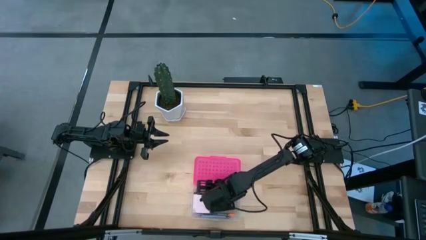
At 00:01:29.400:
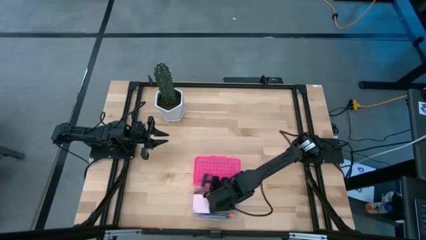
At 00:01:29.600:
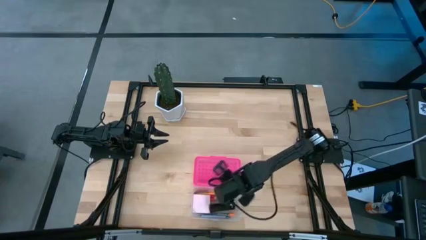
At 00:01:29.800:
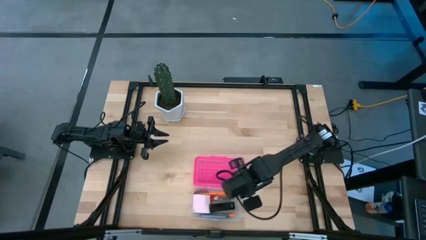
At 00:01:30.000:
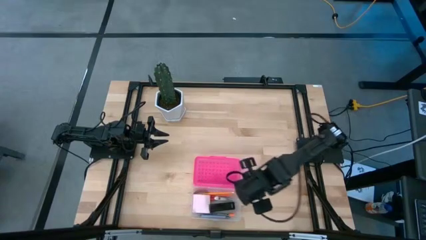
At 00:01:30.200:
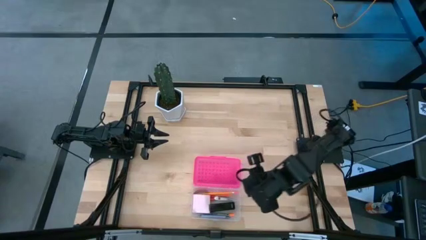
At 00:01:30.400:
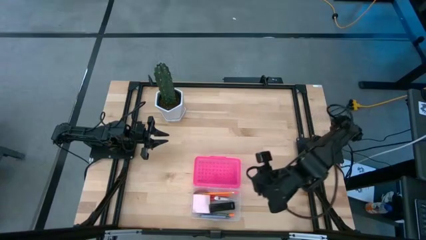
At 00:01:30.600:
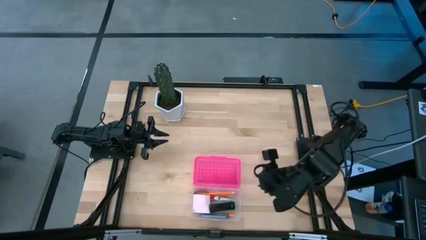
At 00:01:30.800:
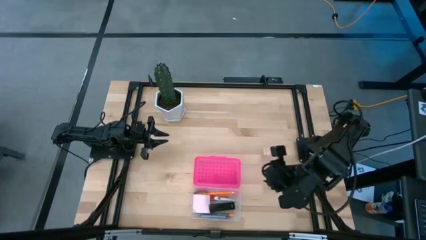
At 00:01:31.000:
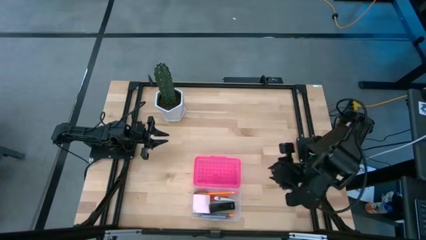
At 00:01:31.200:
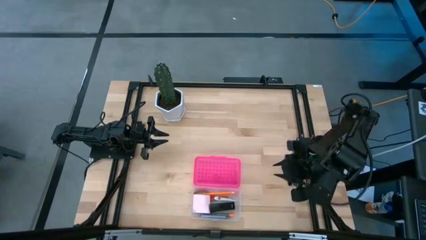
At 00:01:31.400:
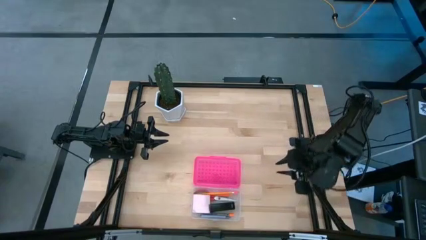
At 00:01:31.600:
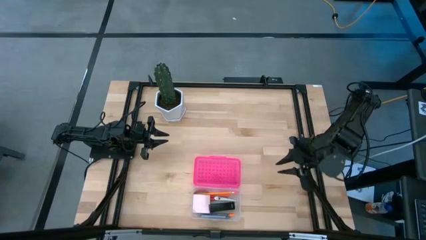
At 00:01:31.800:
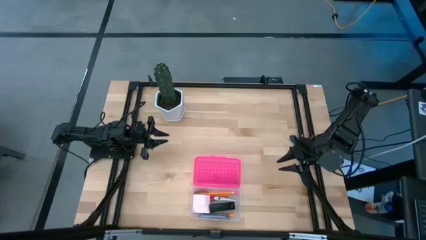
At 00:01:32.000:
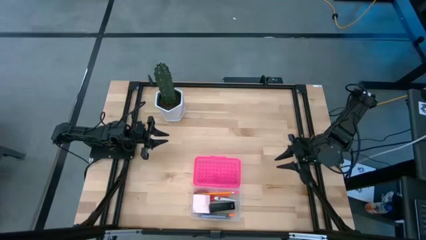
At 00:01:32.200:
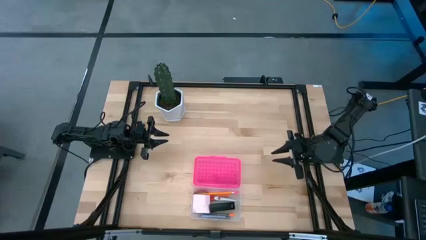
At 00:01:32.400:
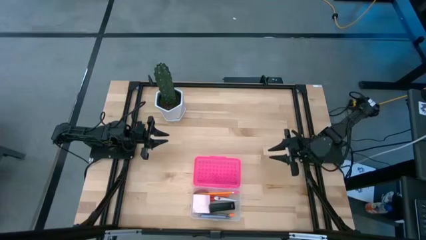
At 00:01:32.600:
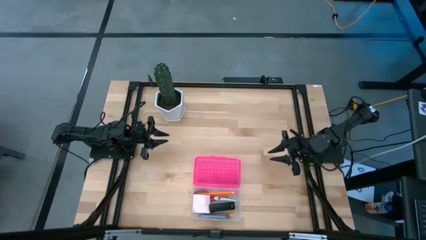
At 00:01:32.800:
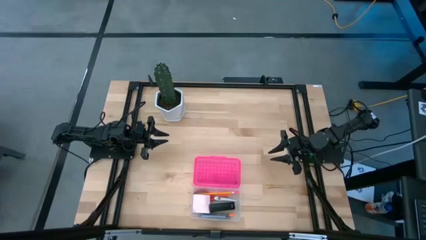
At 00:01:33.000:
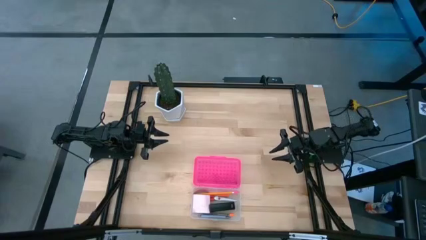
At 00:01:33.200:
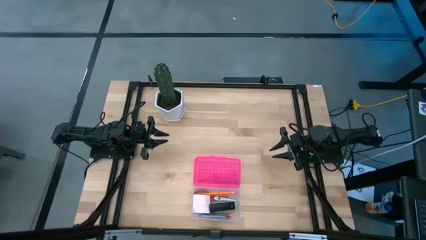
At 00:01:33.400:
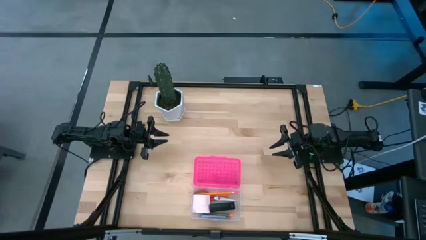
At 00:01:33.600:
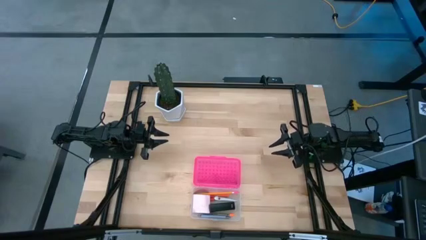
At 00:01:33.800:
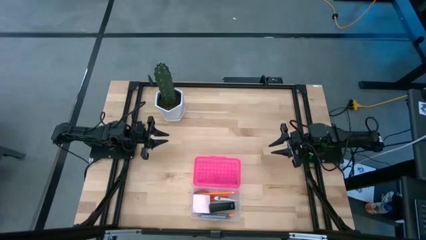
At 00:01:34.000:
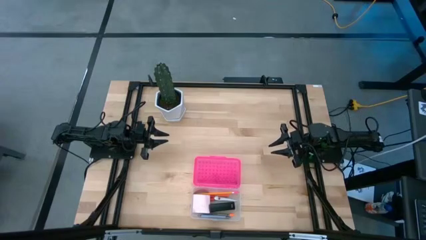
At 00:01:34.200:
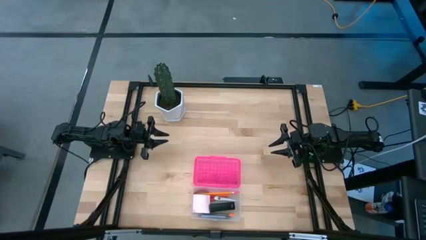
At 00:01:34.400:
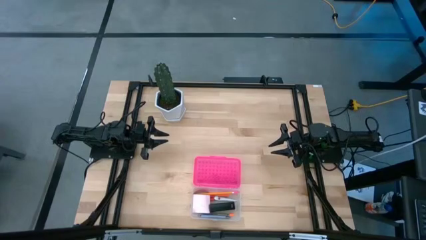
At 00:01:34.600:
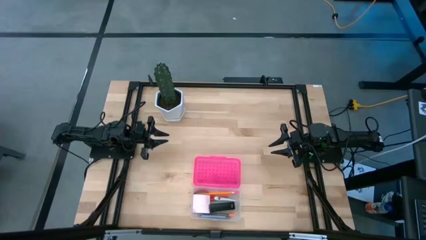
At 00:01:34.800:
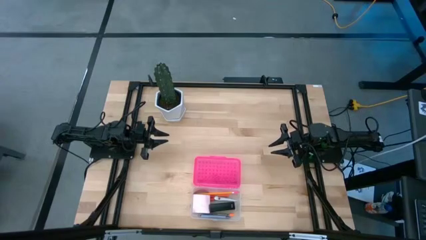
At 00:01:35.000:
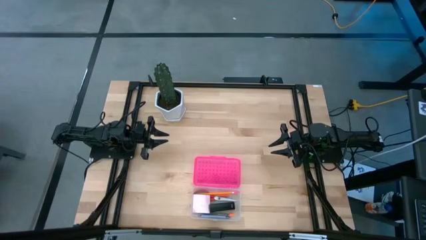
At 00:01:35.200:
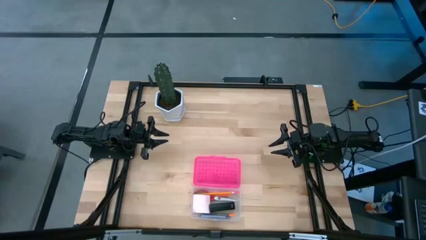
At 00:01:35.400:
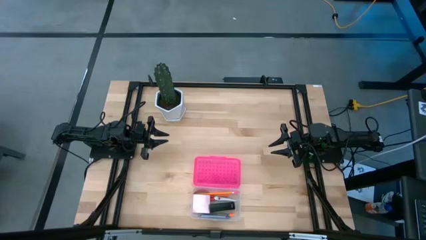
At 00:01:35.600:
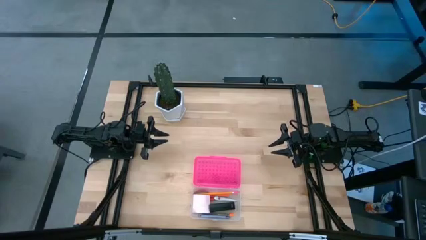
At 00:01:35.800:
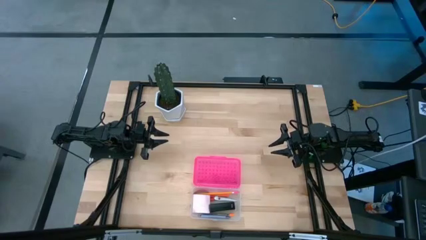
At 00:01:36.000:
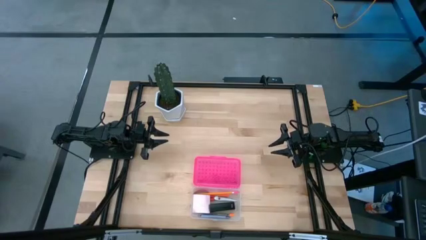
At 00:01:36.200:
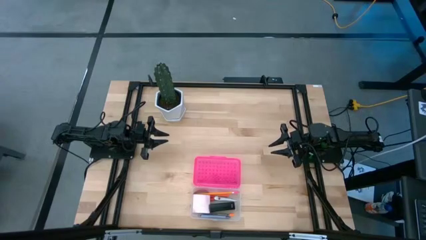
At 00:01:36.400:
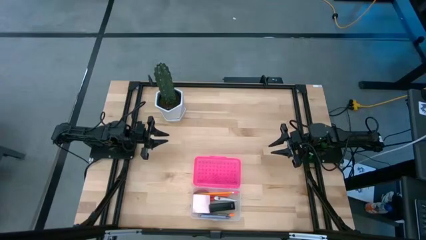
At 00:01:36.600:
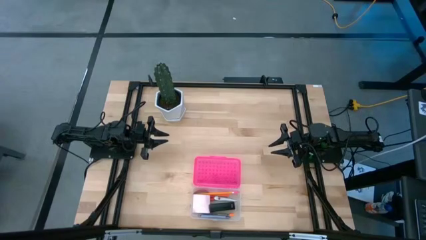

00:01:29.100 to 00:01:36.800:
Task: Pack school essentials
Return to Home Position

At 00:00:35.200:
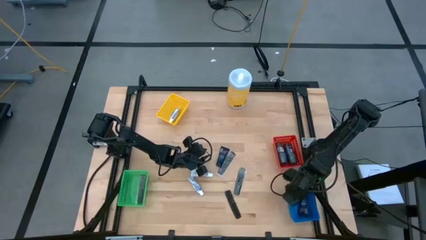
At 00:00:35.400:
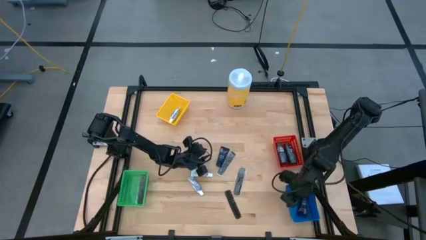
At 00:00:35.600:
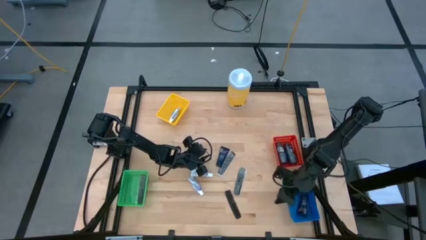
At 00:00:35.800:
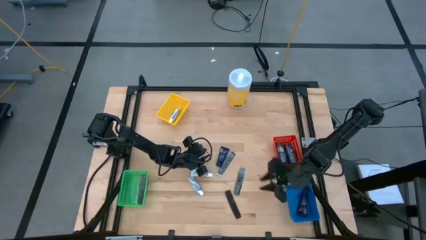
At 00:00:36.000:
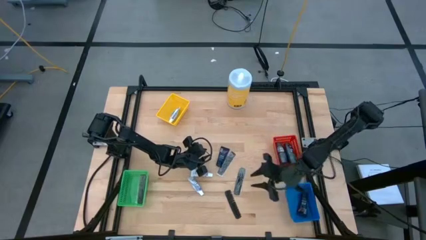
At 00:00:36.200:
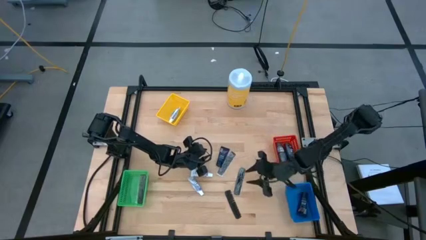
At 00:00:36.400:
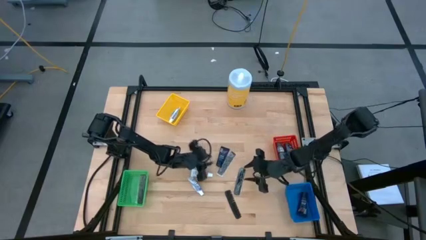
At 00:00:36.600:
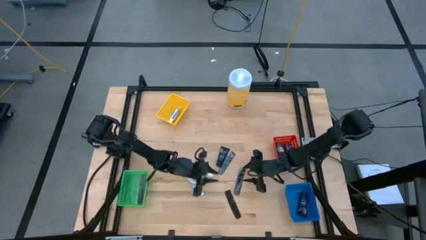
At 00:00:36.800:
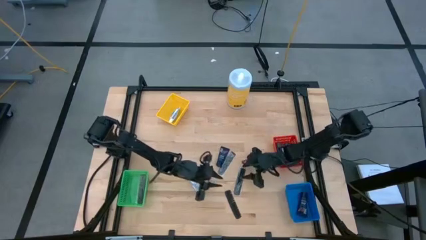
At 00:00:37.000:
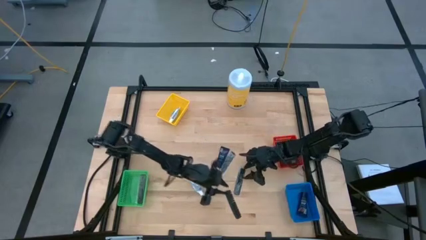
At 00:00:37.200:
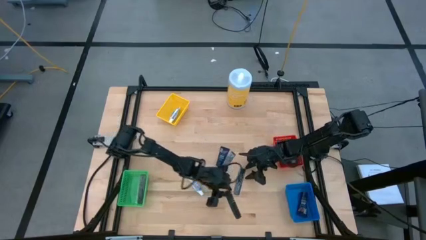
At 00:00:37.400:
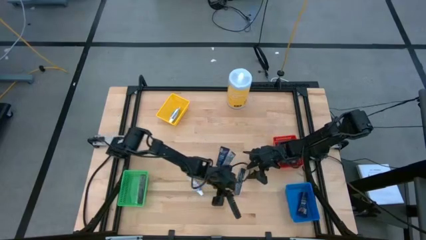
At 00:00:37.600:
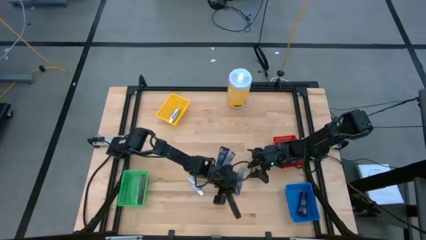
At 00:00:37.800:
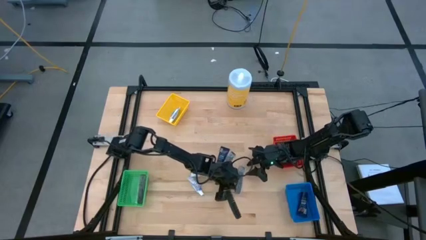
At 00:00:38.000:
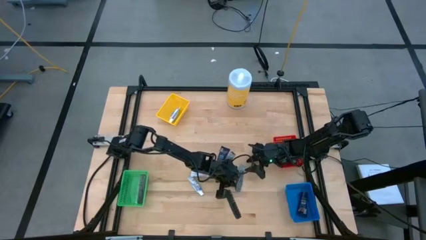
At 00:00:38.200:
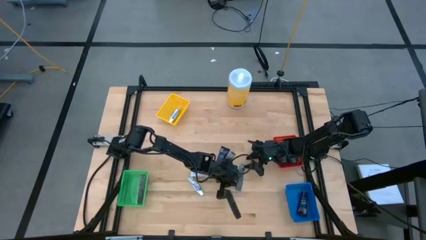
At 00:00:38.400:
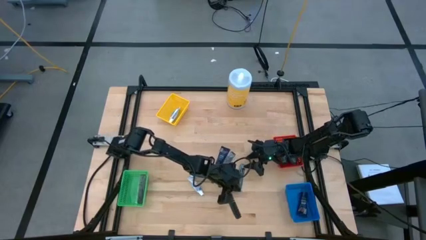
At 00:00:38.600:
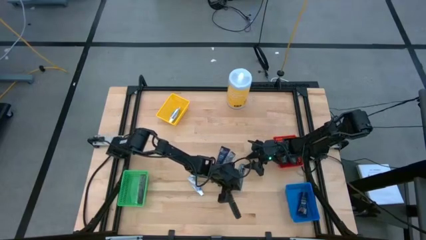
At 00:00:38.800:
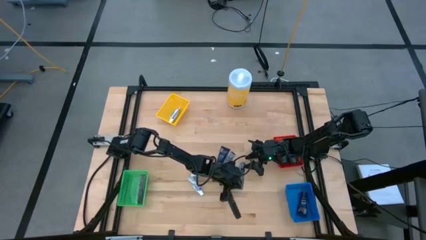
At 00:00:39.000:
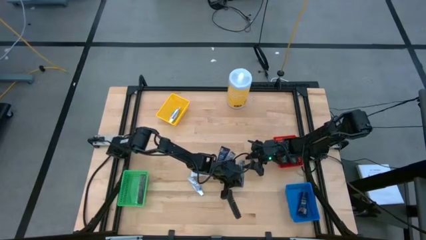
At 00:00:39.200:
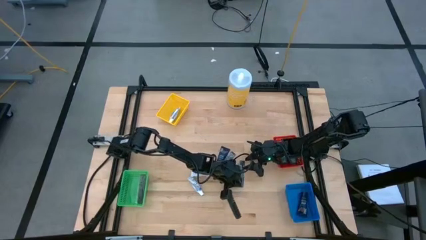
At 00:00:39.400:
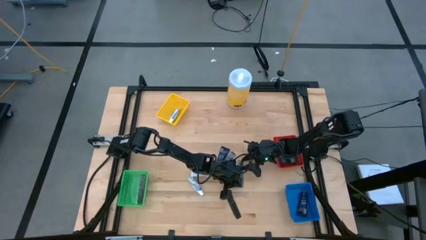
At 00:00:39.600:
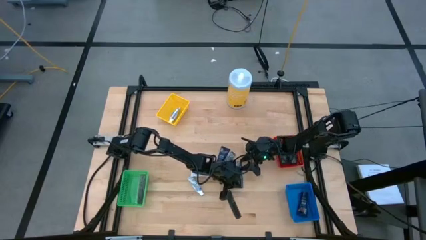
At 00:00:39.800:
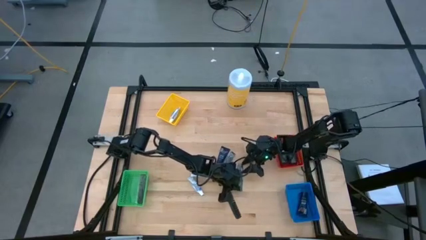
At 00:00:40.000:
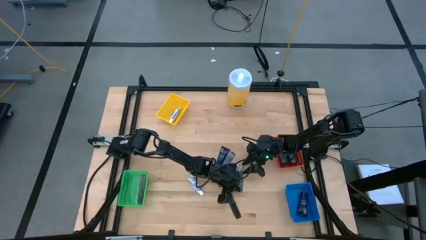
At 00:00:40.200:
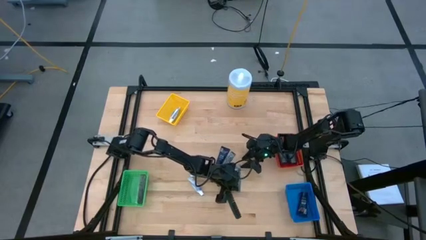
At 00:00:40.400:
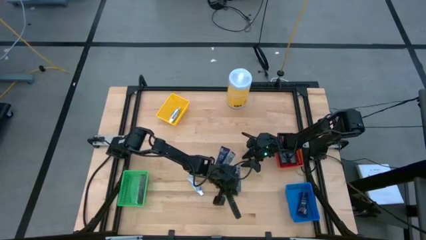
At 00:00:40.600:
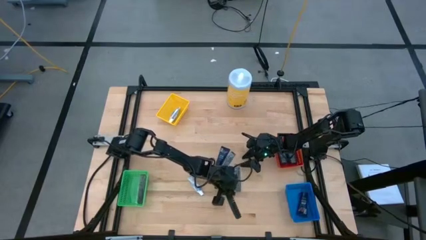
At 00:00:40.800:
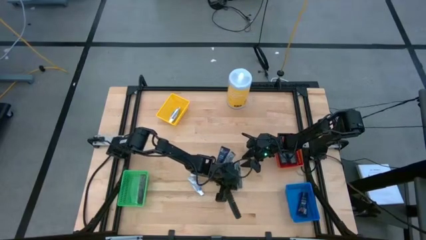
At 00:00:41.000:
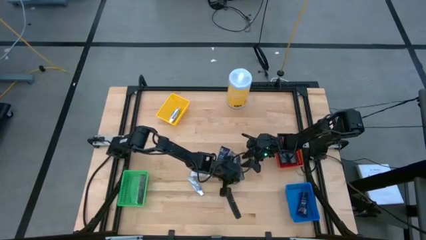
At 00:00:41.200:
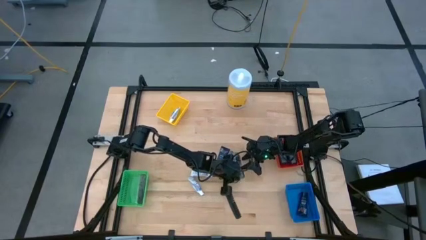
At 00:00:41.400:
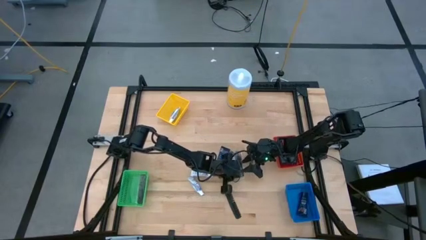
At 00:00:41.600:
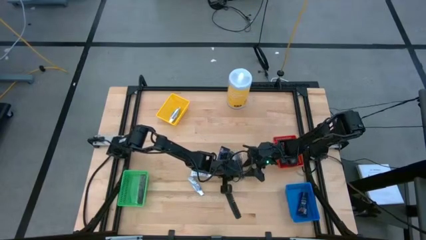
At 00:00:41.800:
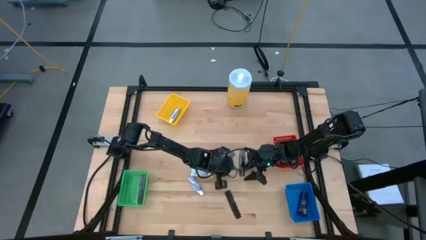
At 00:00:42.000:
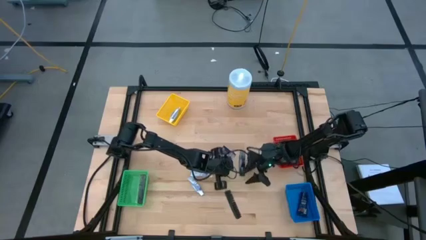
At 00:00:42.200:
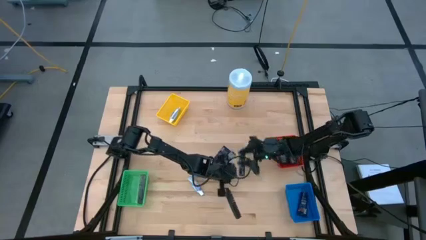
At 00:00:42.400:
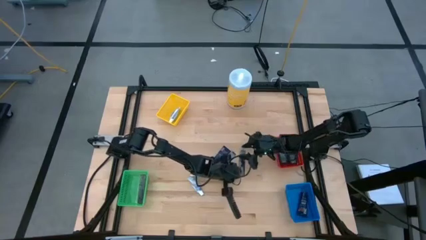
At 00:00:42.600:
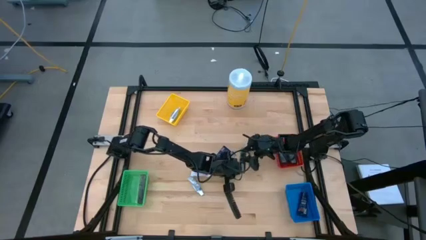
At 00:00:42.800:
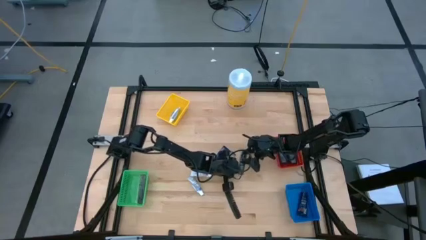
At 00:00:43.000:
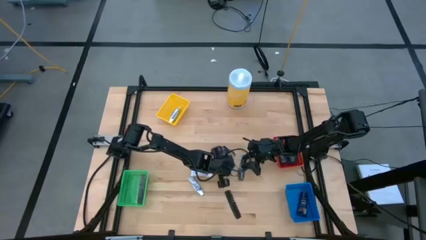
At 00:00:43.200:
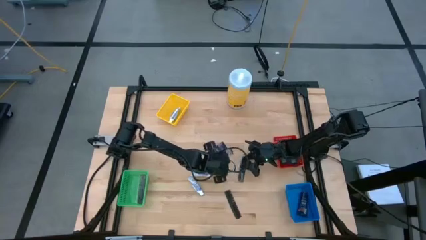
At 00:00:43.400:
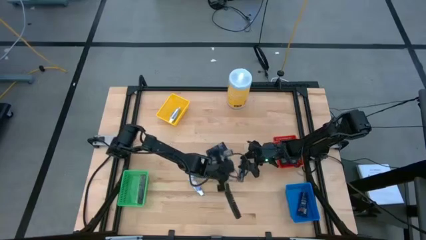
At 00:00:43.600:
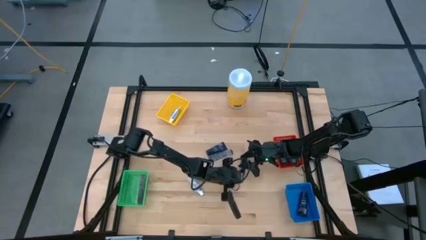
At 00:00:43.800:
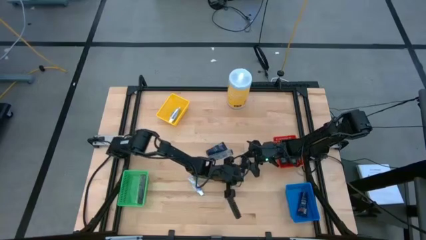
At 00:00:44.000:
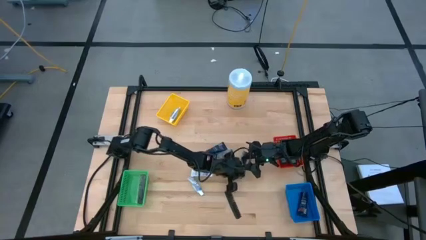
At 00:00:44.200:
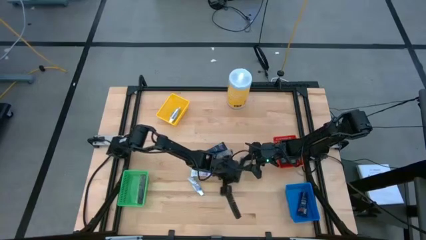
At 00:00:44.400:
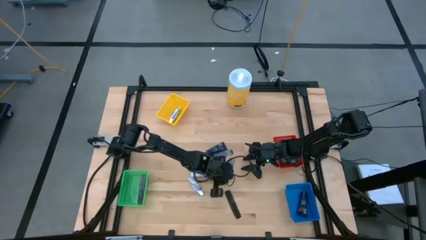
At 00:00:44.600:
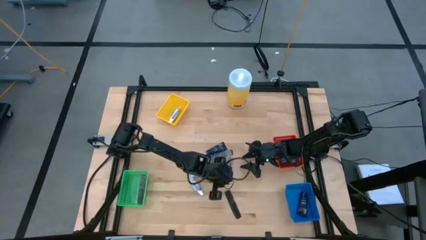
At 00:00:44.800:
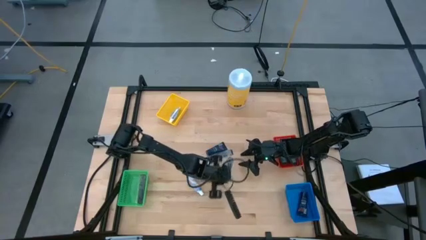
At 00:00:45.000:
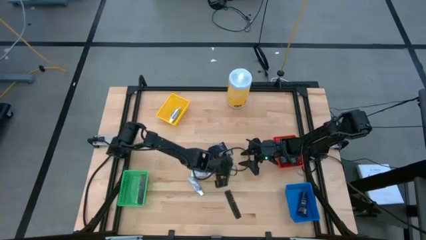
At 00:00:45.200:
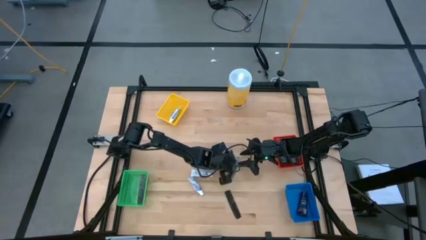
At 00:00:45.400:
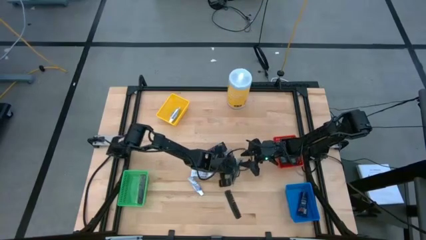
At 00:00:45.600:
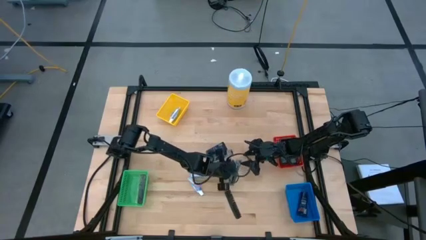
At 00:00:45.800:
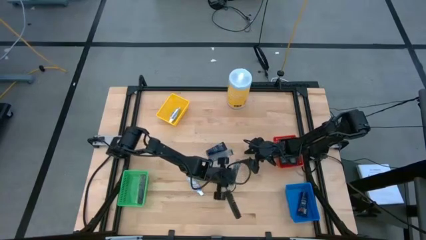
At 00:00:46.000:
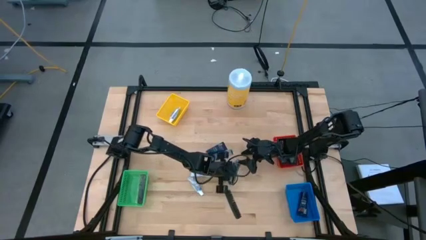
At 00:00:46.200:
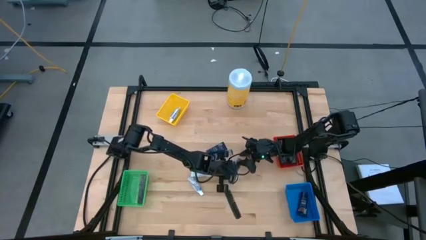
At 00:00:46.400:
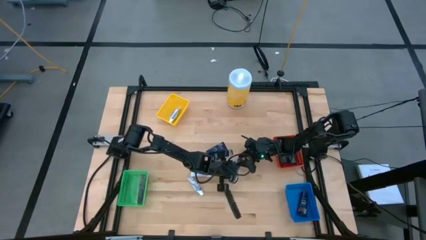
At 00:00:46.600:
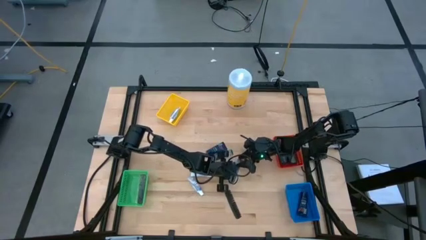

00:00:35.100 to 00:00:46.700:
Task: Pick & Place Travel size toiletries
Put the black comb into the green bin
